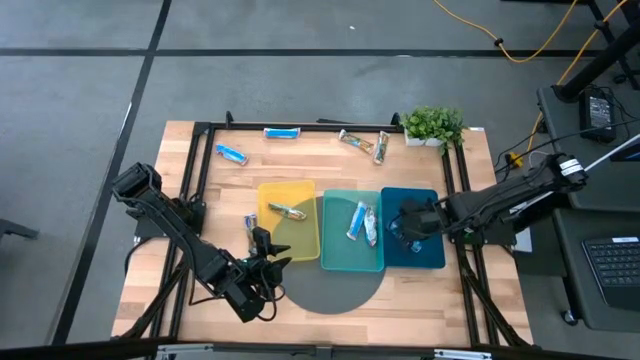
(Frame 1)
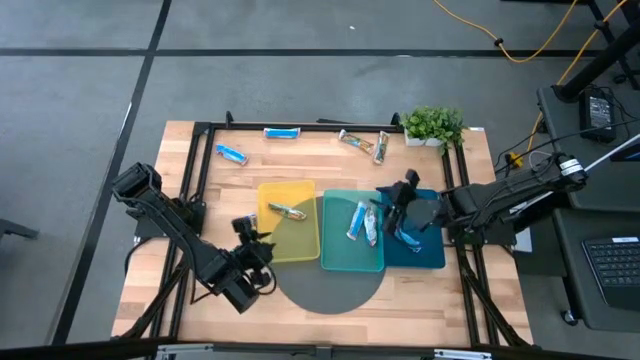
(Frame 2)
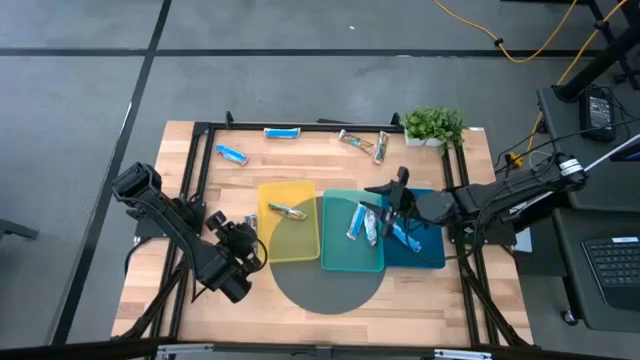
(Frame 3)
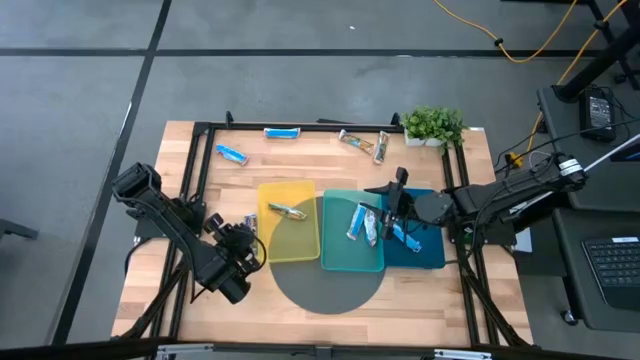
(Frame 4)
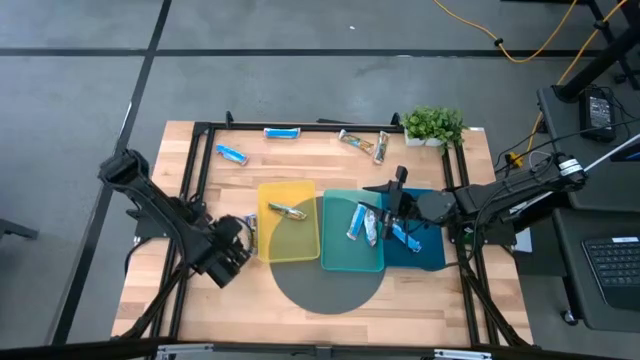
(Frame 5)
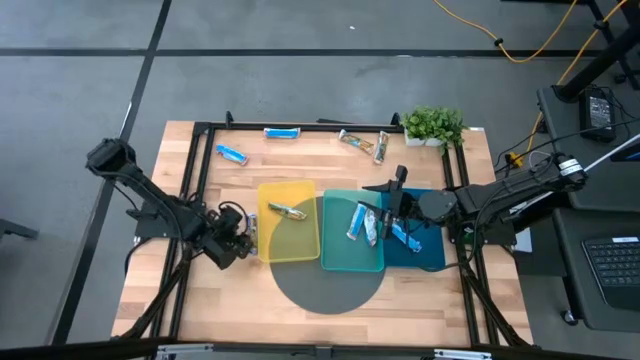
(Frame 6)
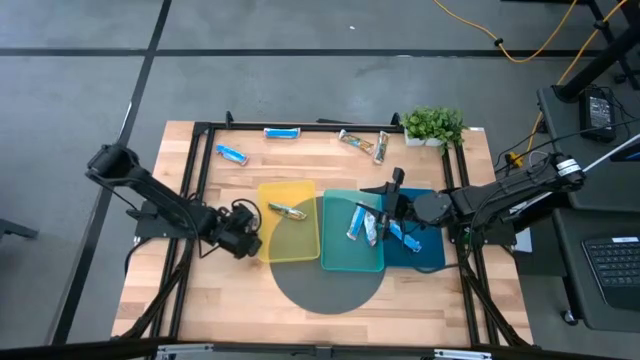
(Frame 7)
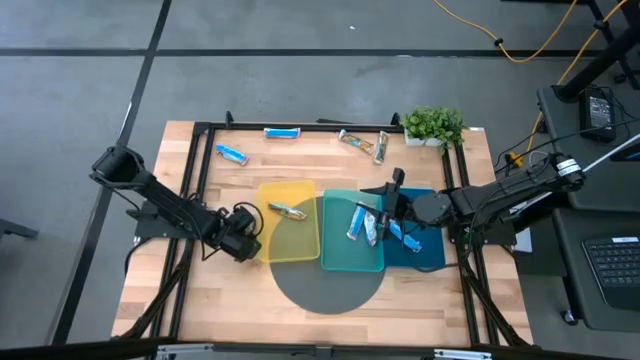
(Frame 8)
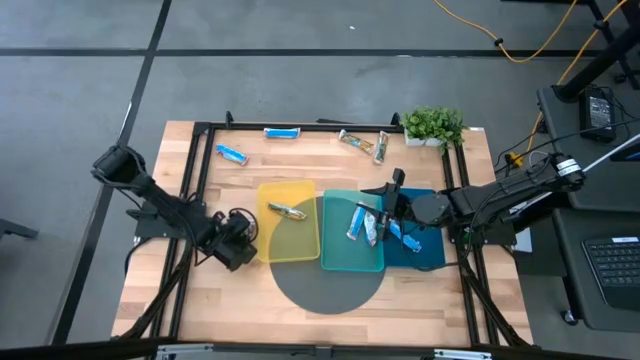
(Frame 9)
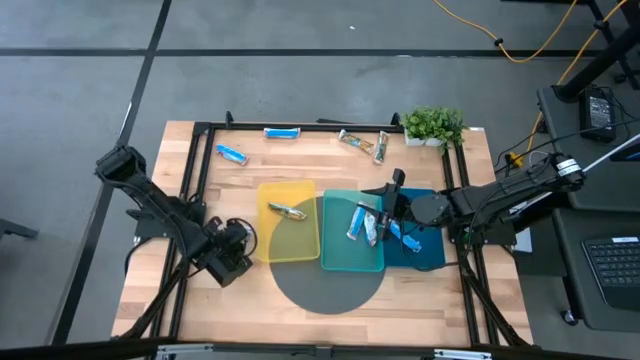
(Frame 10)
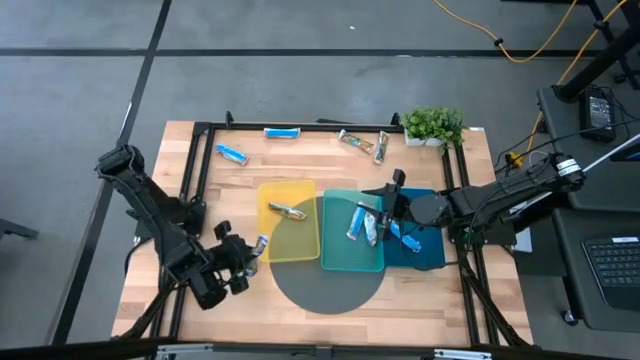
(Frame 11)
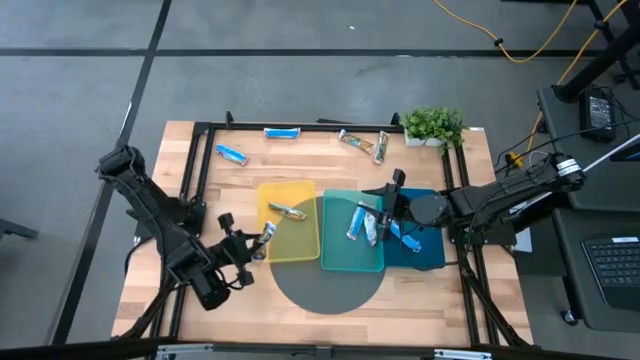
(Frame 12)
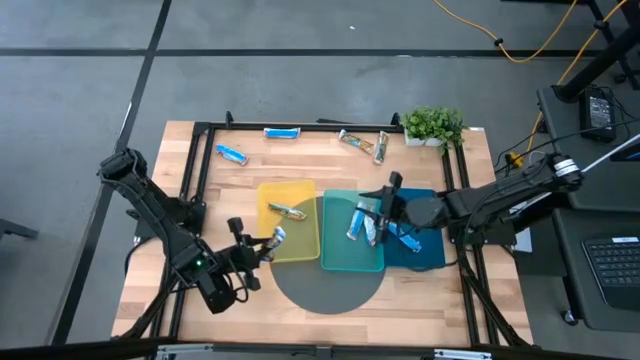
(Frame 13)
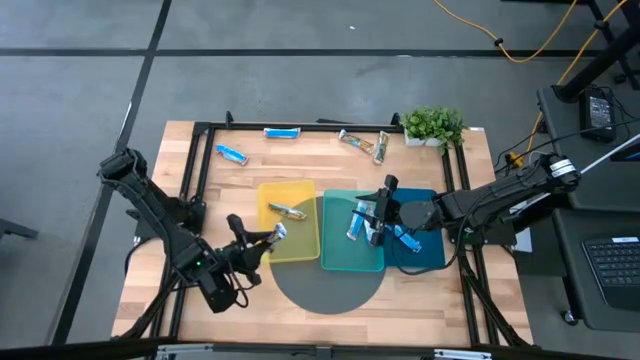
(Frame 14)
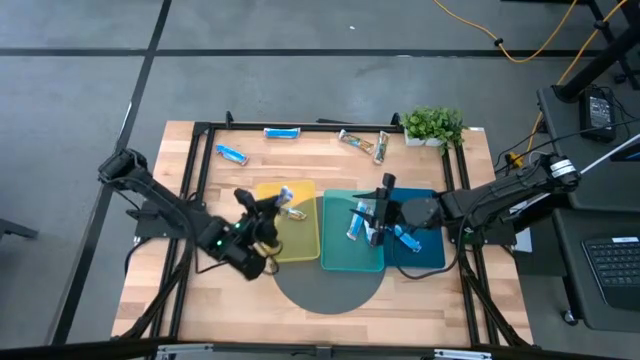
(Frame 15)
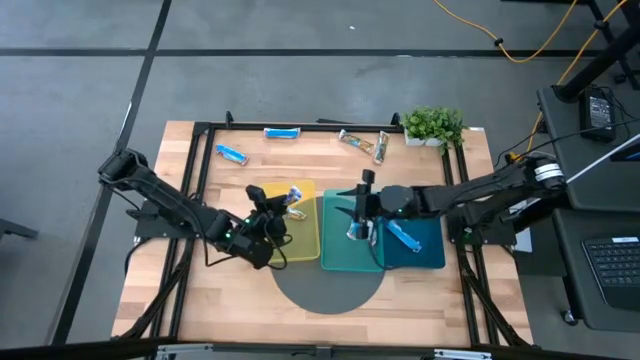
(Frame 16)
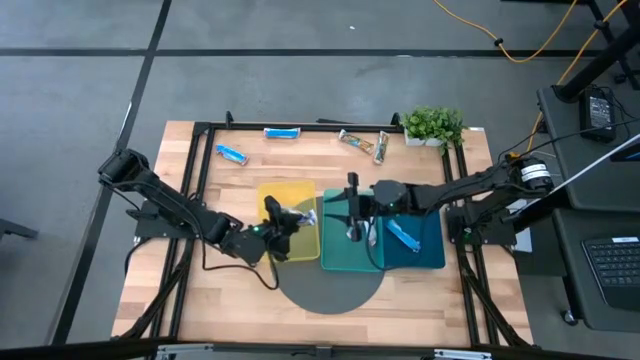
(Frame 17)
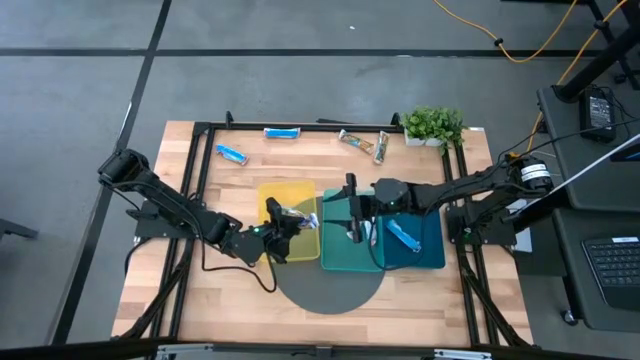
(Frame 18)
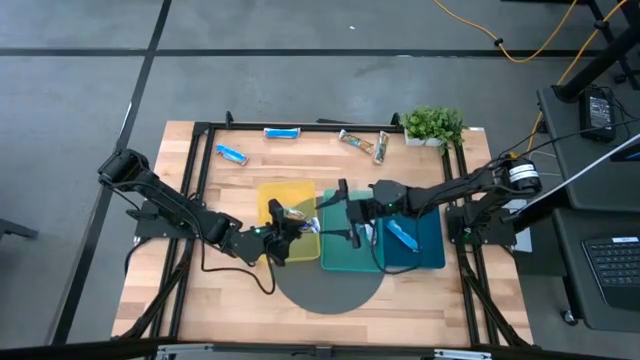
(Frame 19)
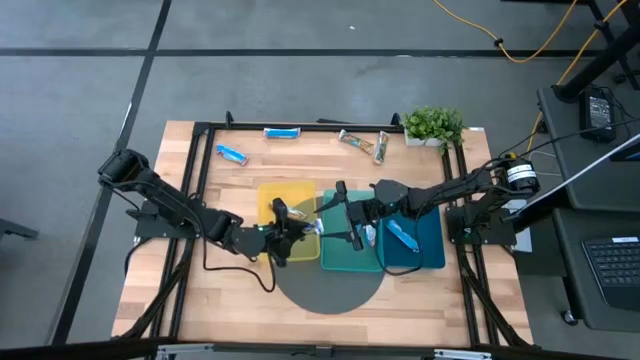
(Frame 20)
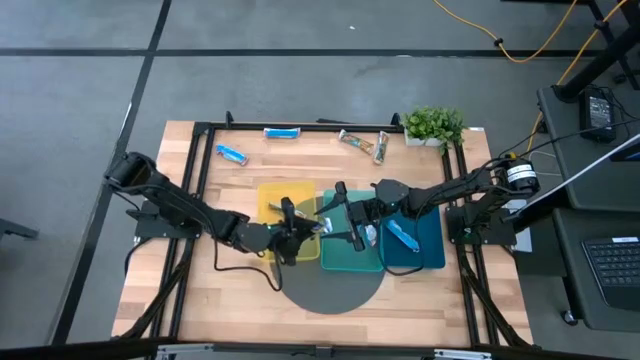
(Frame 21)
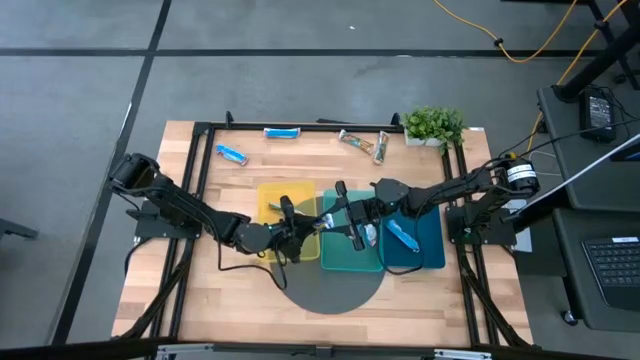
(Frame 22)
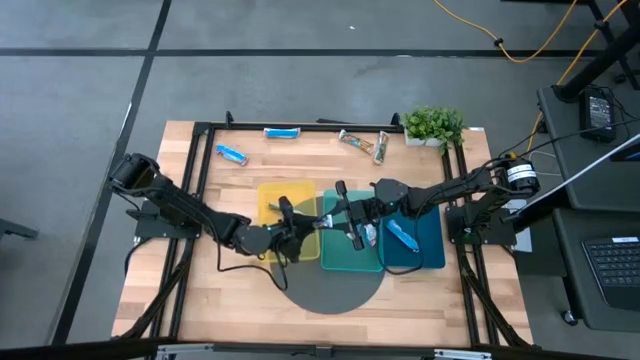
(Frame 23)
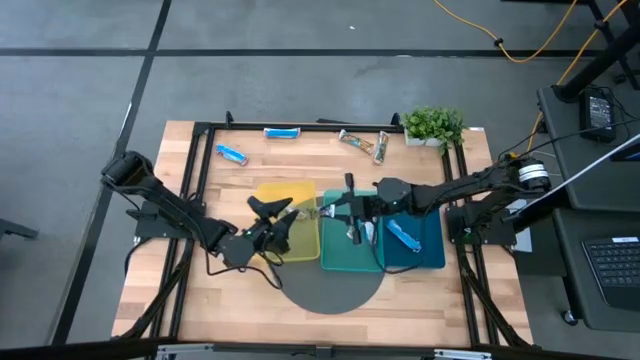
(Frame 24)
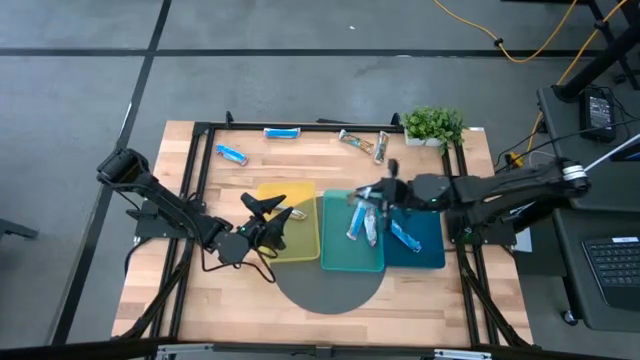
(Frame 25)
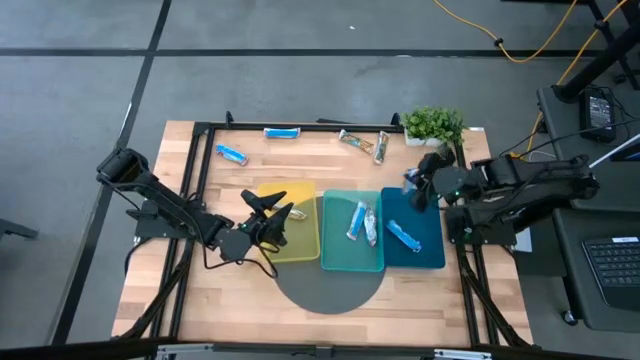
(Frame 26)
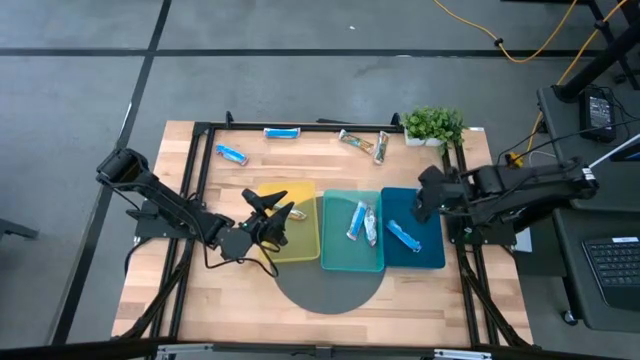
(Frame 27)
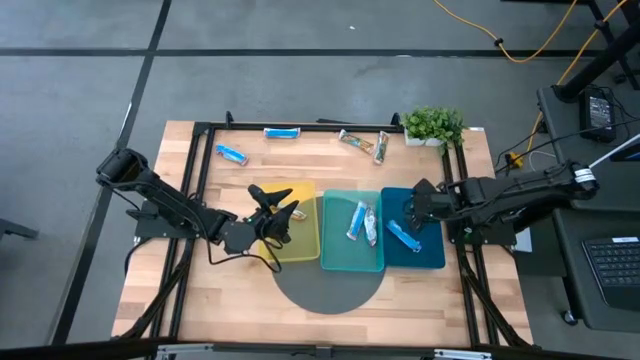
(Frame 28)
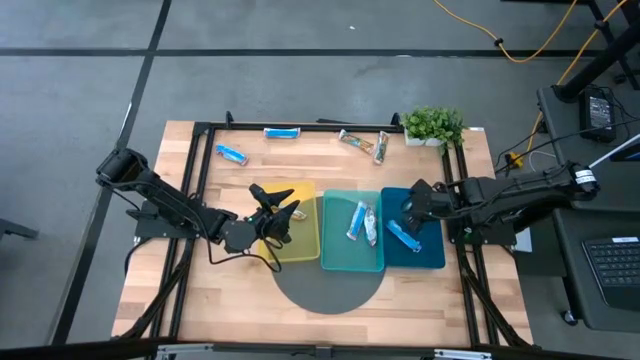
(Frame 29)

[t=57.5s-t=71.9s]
Task: Pick and place Granola Bars by type
Put the blue granola bar into the blue bin

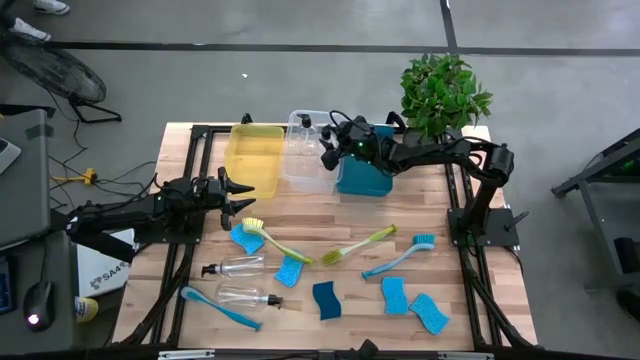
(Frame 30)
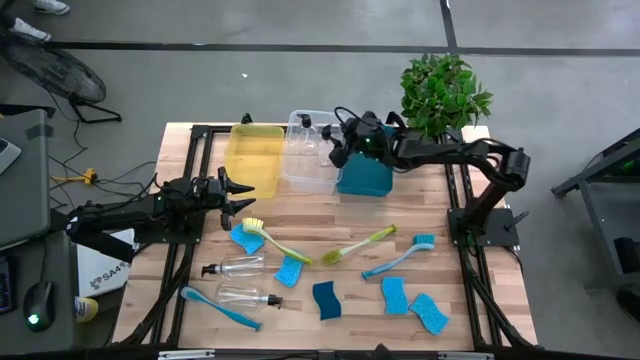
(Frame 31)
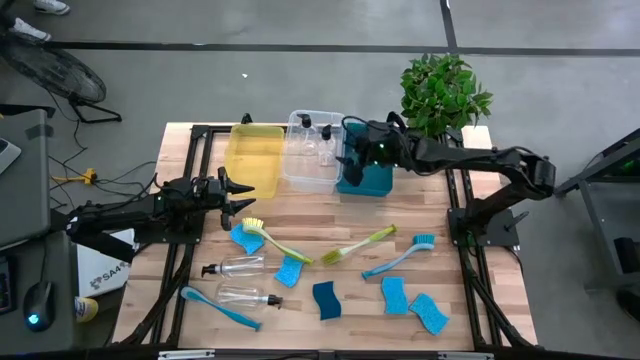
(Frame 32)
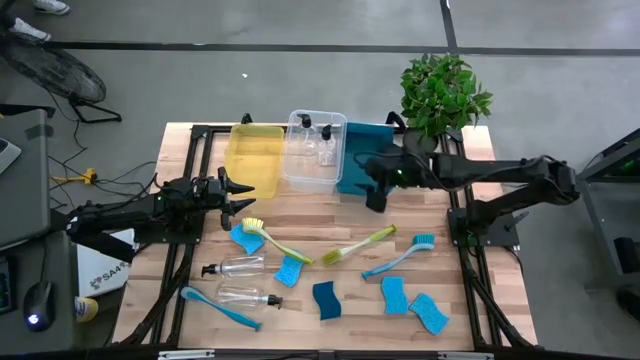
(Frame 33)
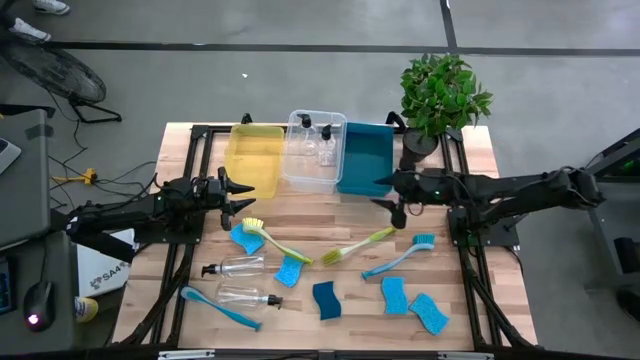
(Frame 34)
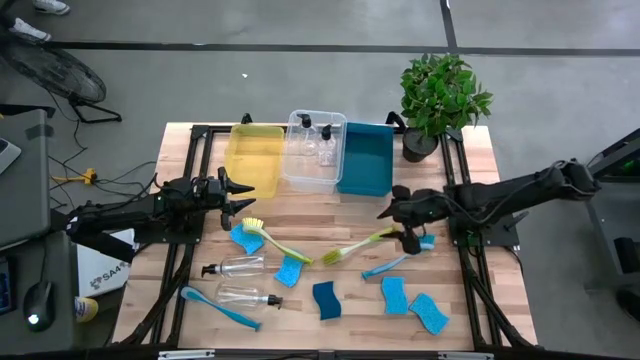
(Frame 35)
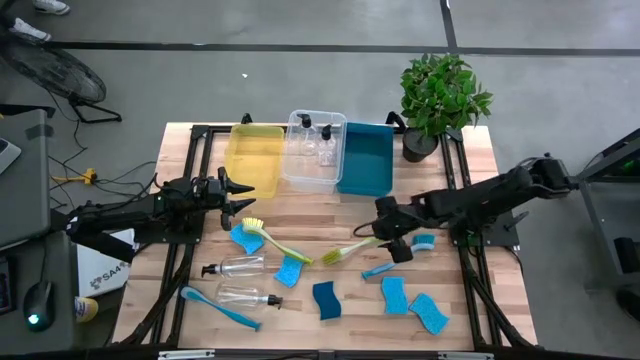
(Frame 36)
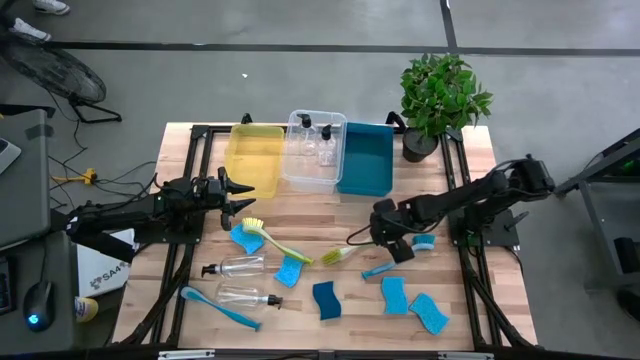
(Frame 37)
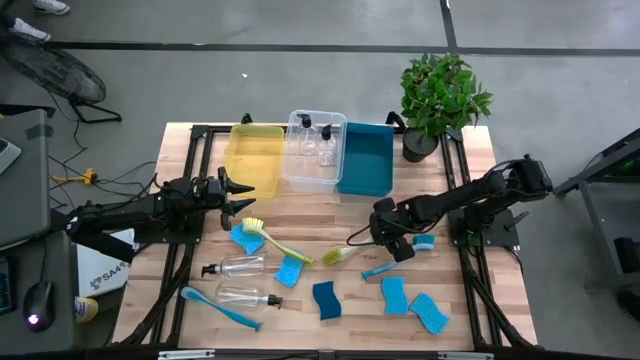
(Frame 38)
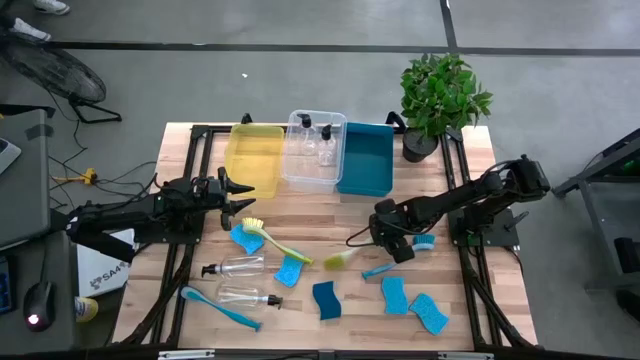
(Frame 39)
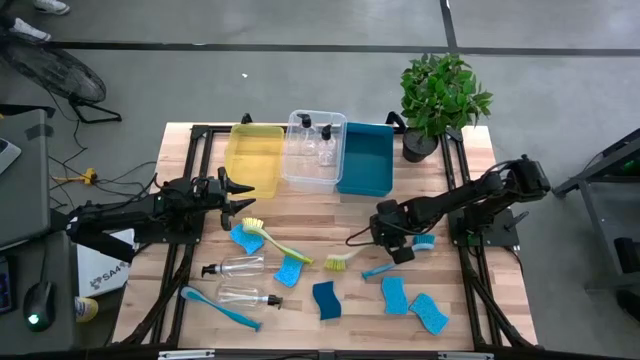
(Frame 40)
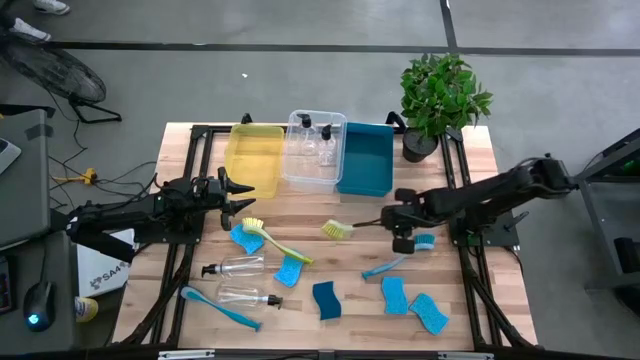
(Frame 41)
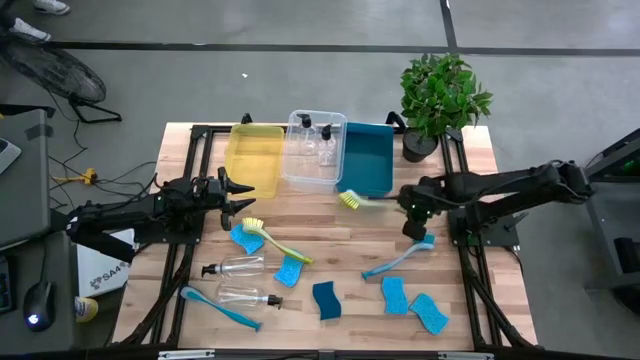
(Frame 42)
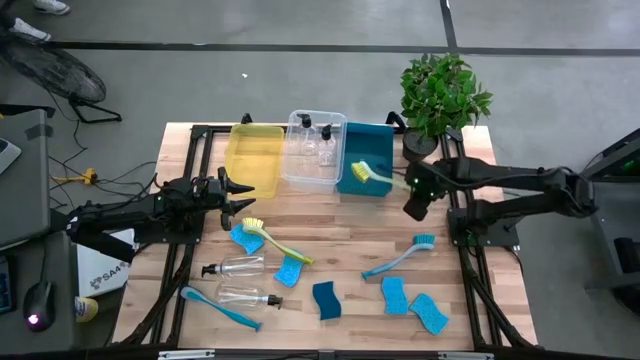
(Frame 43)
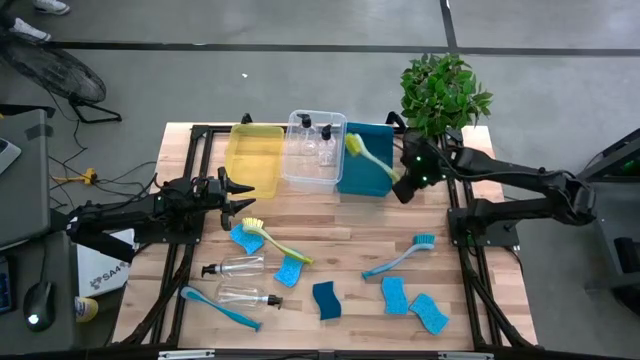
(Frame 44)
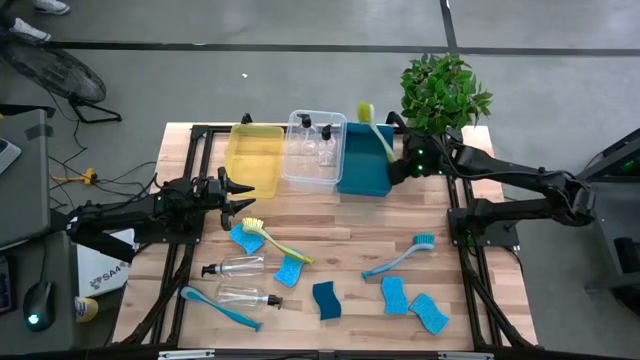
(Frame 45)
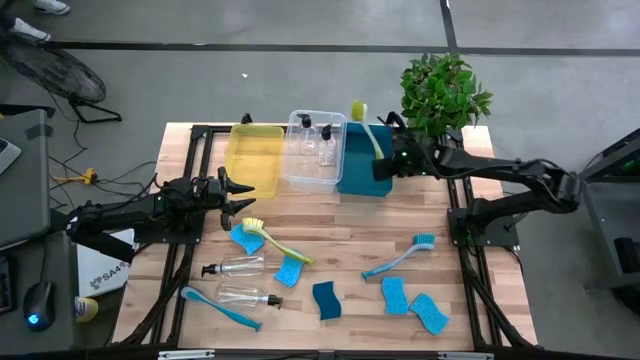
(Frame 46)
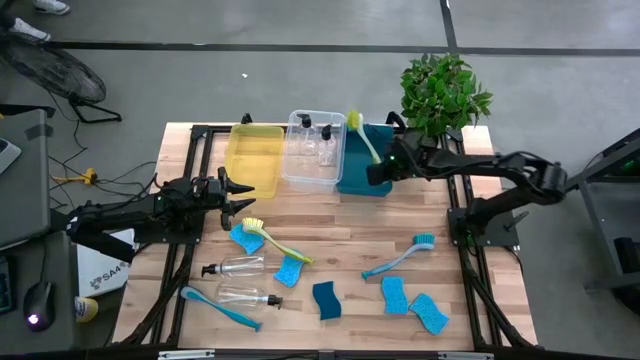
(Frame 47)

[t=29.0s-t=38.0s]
Task: Pick & Place Kitchen Sink Supplies
Put the yellow dish brush into the blue bin
